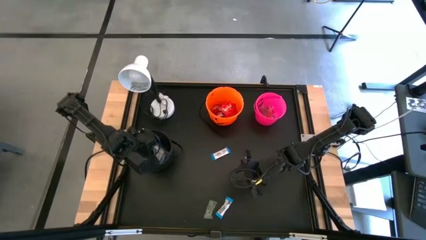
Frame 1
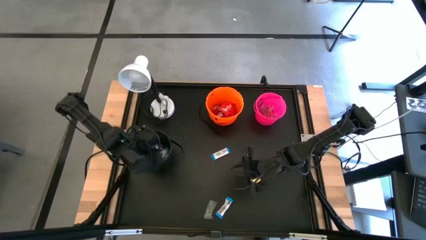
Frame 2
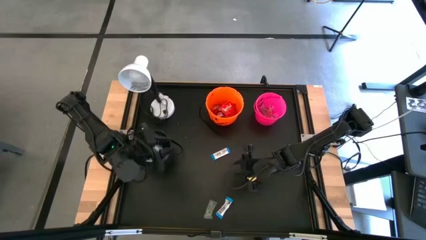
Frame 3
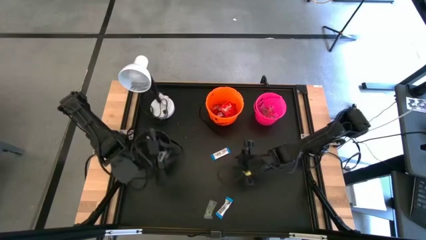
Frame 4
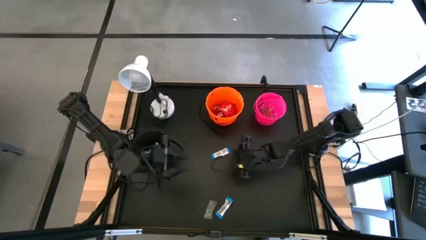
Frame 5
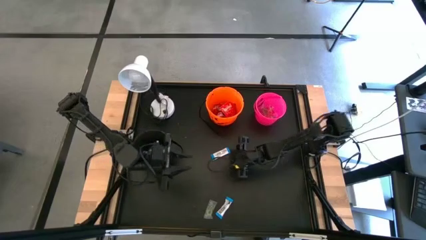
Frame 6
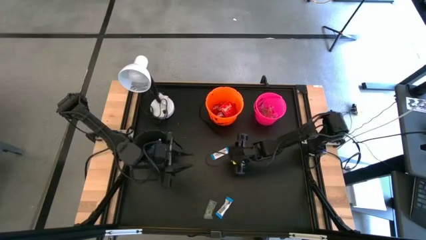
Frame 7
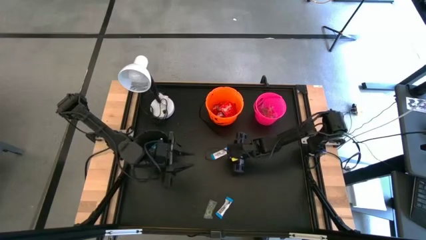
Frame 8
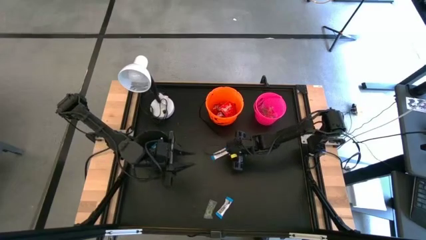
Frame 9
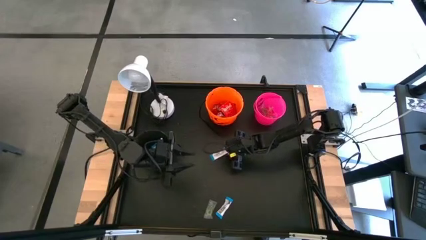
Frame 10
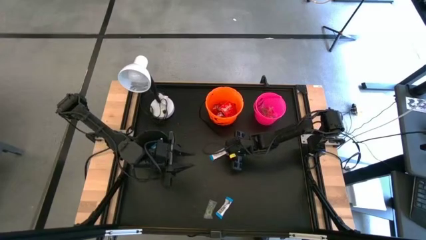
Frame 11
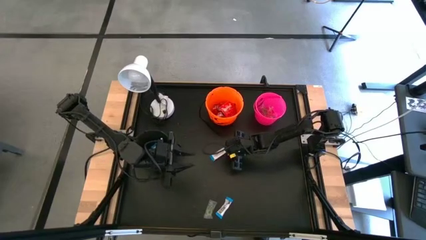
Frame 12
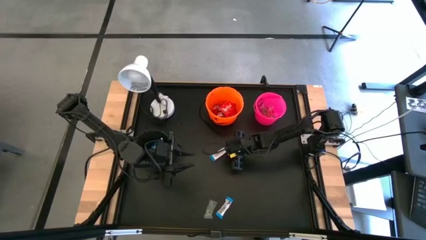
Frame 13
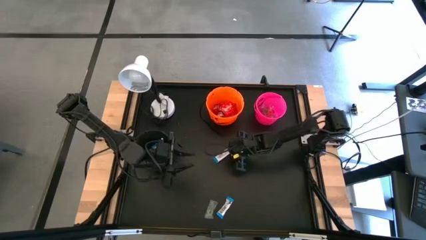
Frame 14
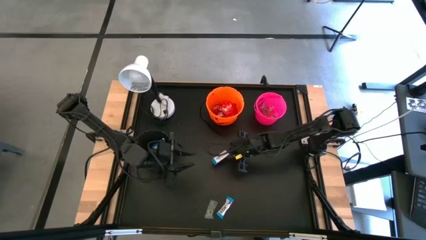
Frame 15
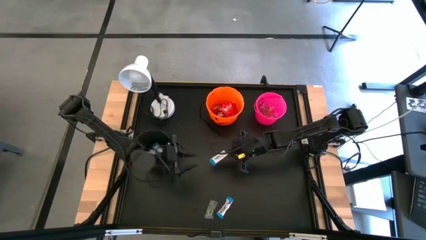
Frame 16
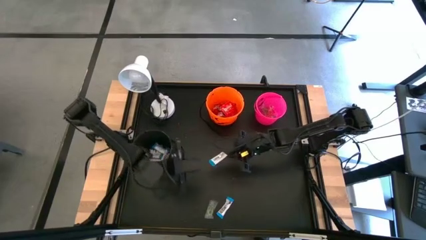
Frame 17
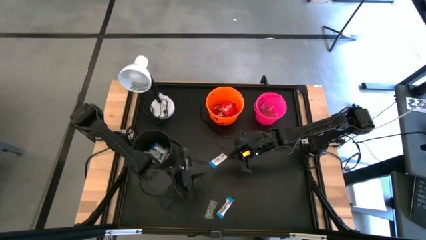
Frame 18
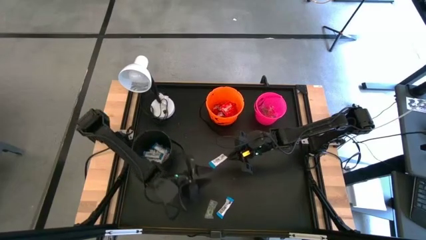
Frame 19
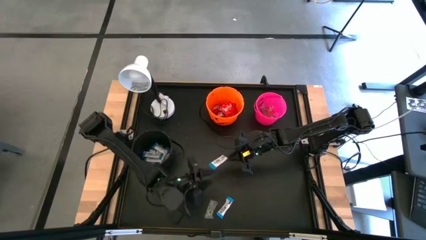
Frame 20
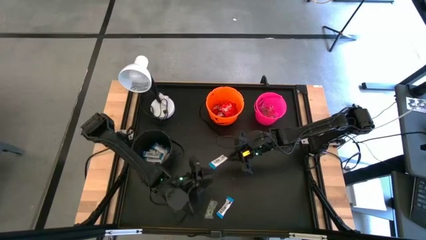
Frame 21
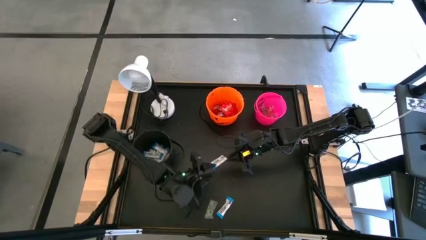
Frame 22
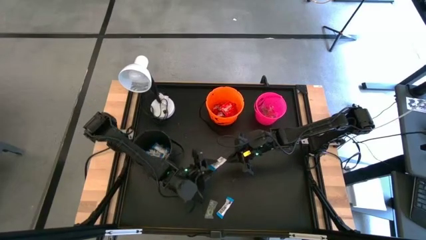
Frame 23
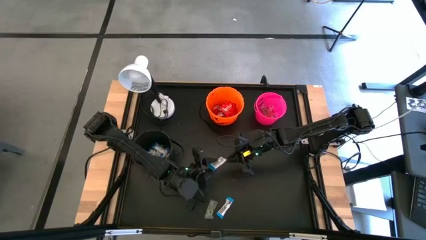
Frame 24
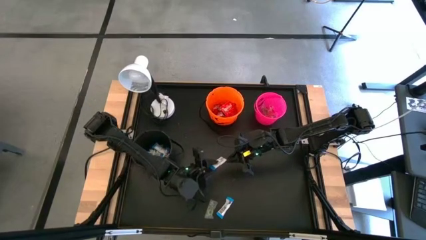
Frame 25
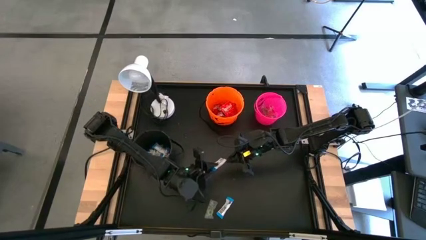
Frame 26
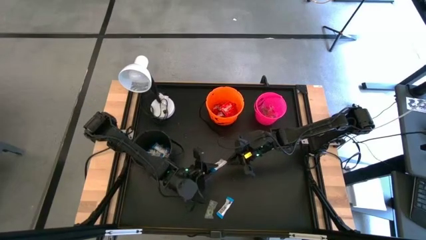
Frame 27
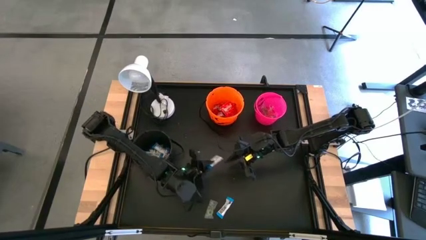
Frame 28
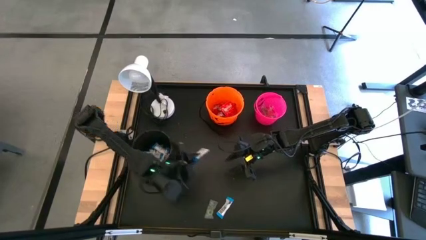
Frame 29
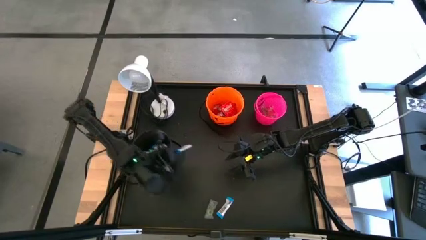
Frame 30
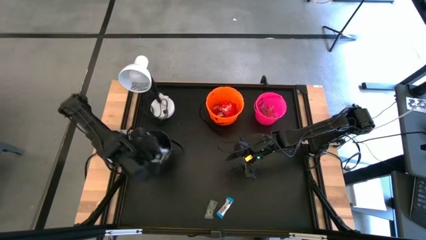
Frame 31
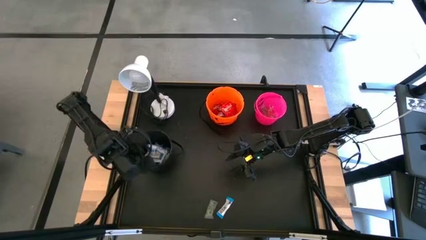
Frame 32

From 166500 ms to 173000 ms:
Task: Sort candy
Put the white candy into the black bucket

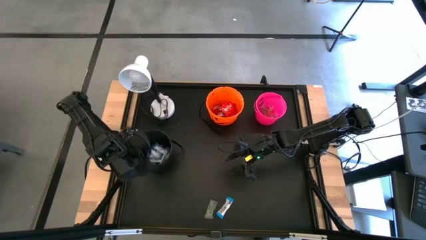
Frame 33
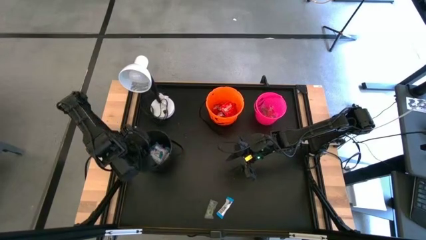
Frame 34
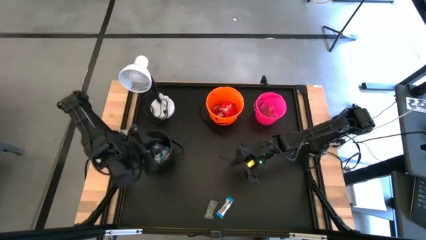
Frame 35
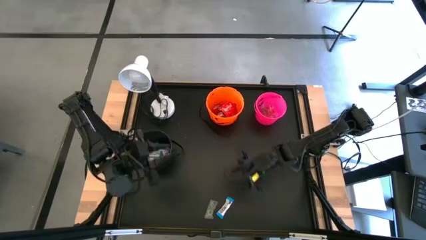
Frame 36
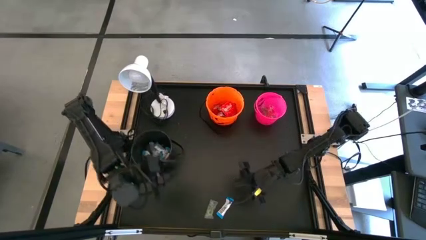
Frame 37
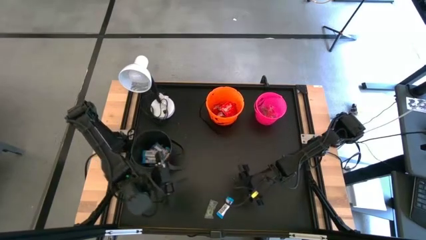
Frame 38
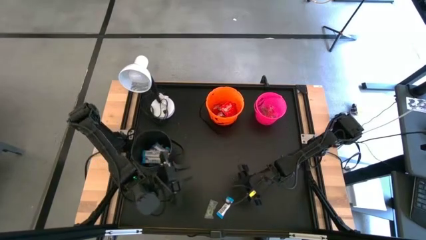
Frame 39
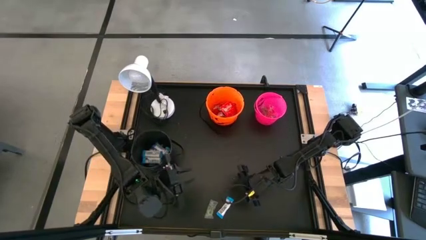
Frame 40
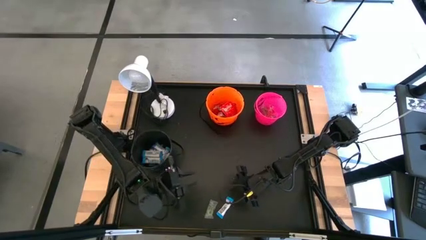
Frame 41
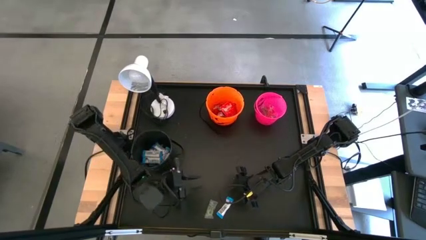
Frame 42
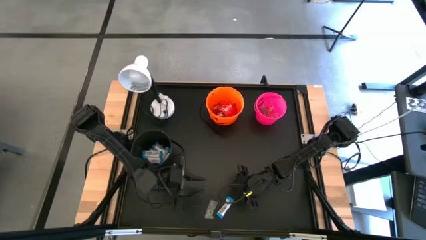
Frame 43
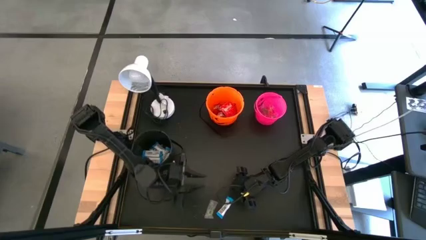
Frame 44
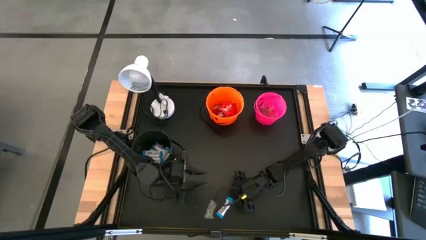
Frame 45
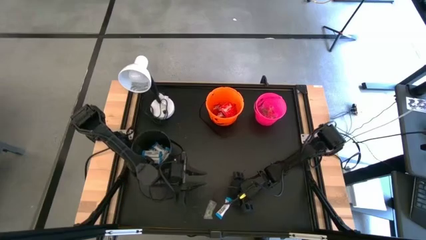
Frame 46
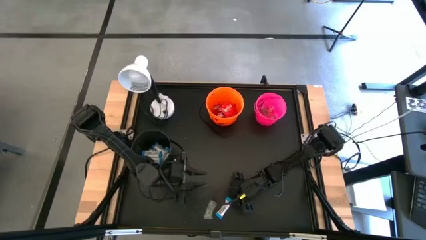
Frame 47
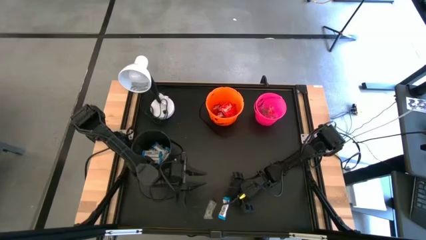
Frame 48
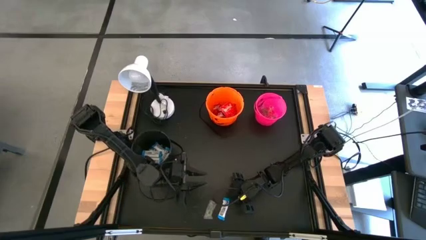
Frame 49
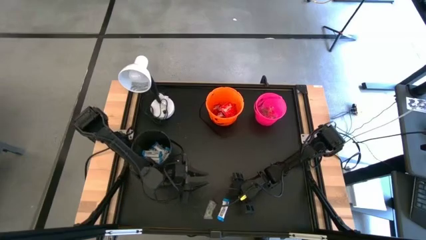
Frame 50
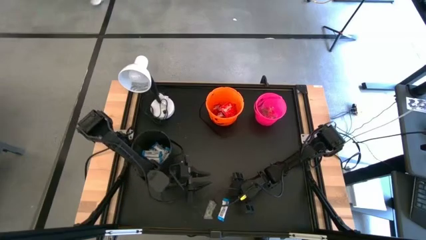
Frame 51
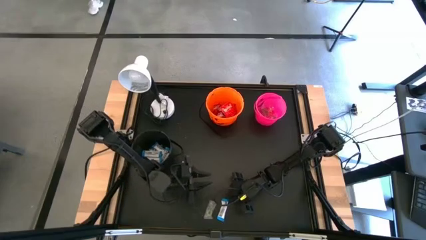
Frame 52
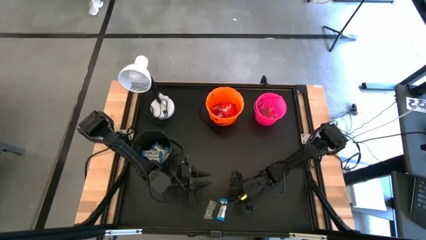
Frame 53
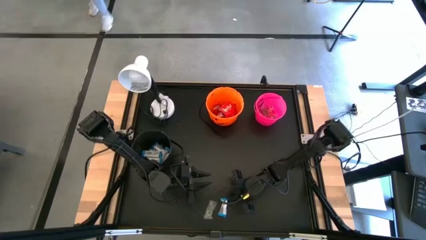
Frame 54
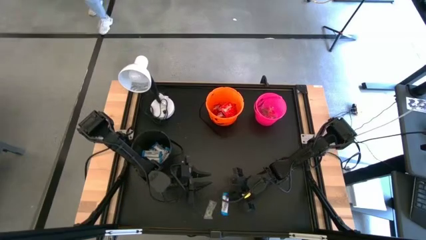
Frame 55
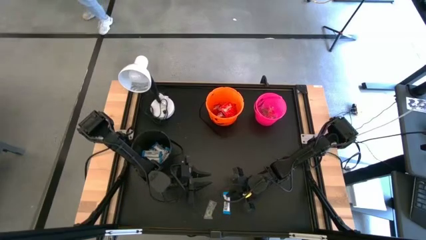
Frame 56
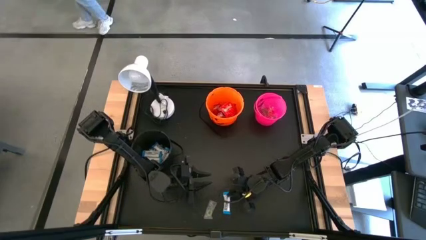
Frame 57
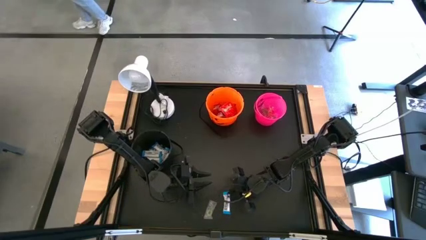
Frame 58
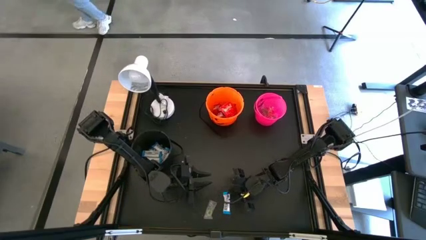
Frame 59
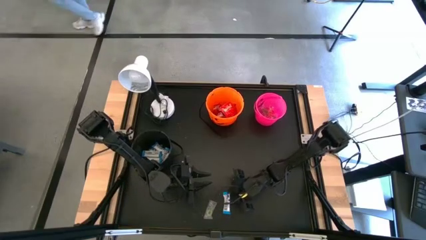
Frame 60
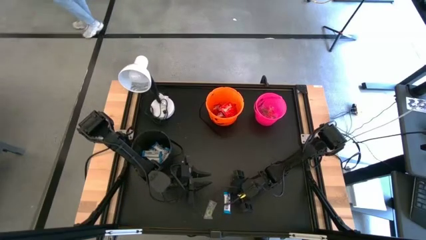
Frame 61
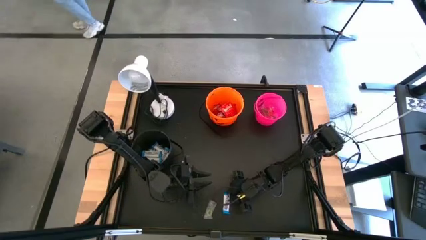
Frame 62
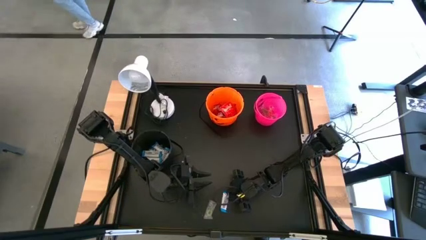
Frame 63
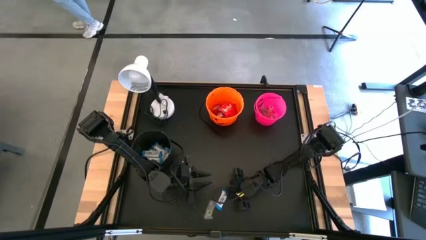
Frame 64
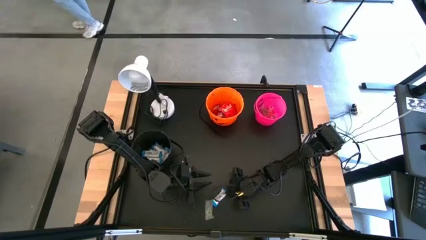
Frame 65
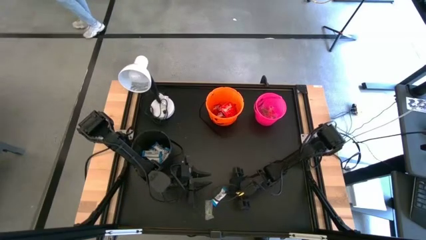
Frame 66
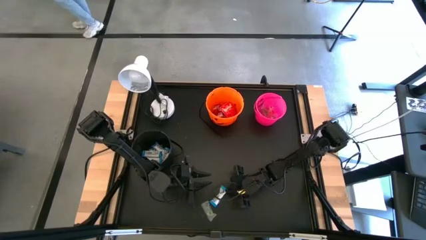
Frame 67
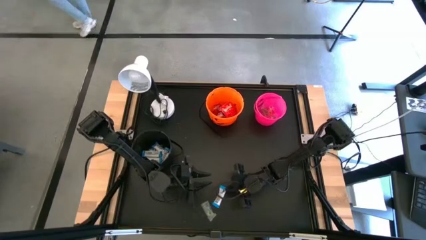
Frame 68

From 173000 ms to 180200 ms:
Put the white candy into the black bucket

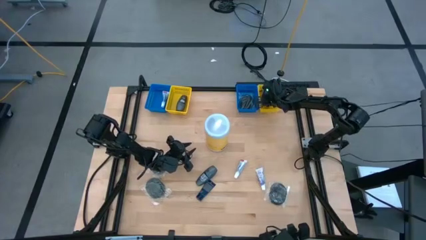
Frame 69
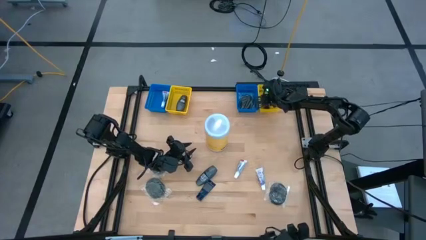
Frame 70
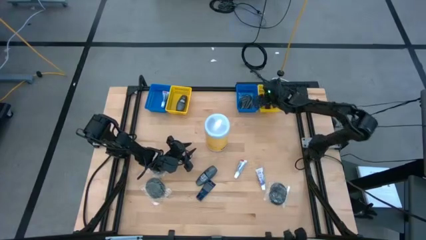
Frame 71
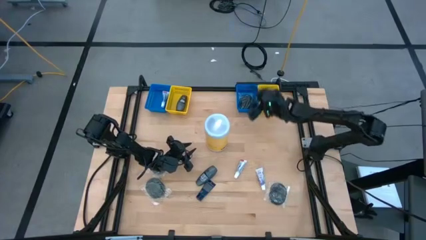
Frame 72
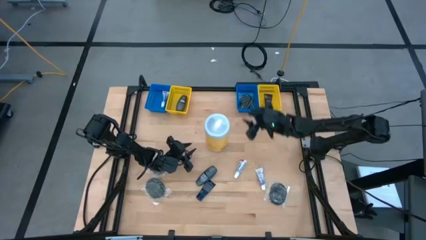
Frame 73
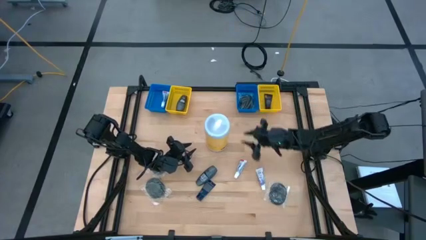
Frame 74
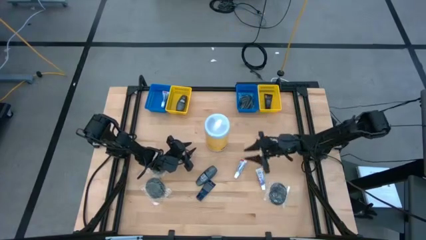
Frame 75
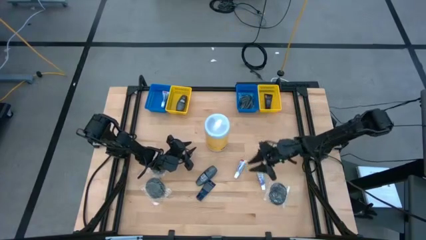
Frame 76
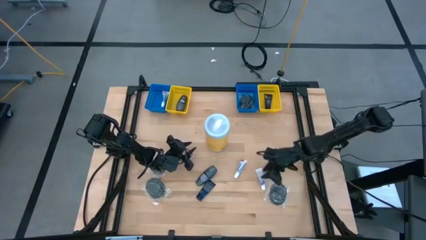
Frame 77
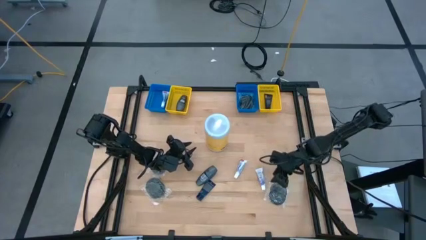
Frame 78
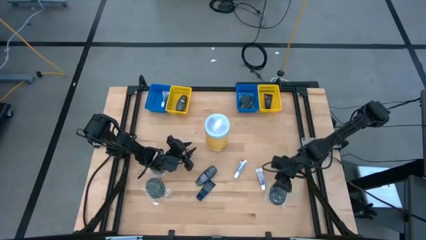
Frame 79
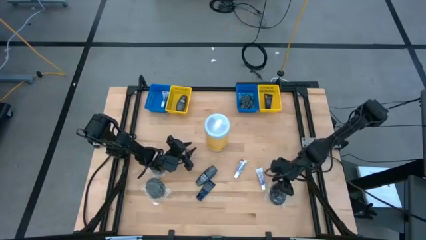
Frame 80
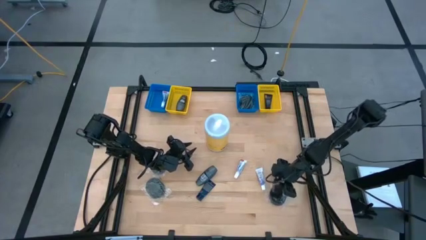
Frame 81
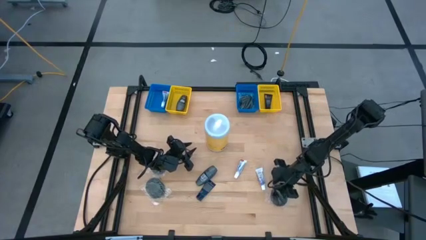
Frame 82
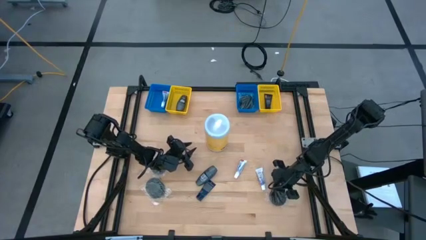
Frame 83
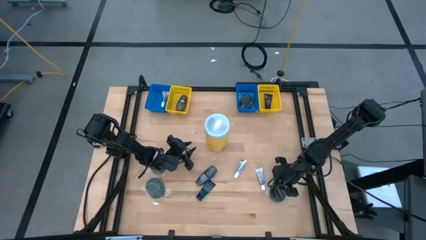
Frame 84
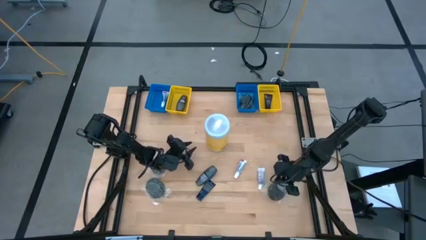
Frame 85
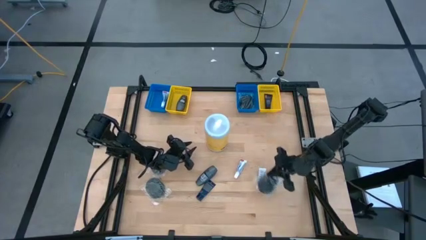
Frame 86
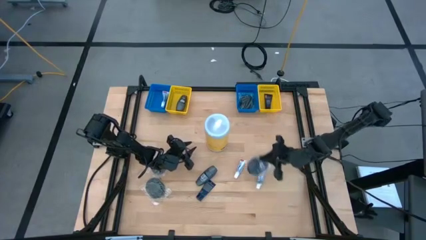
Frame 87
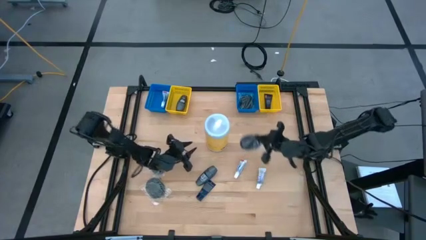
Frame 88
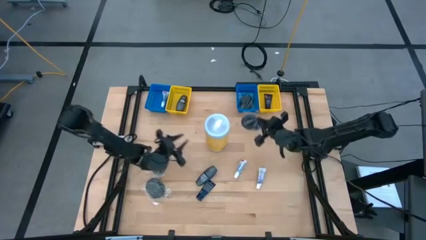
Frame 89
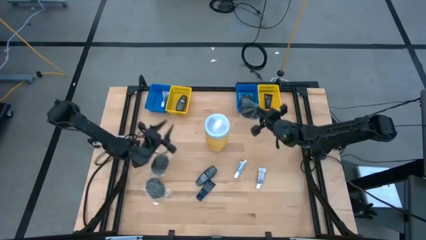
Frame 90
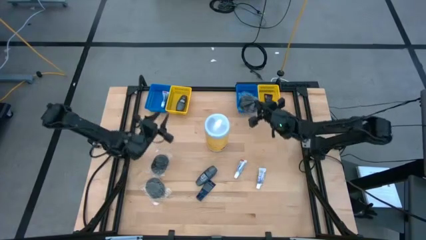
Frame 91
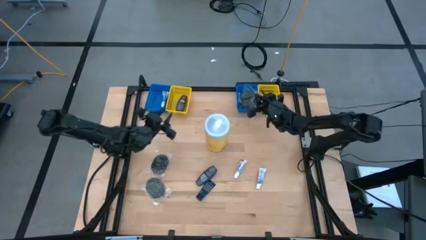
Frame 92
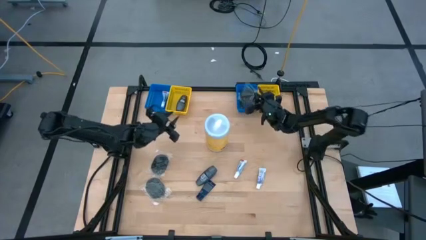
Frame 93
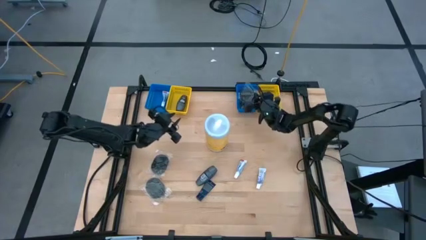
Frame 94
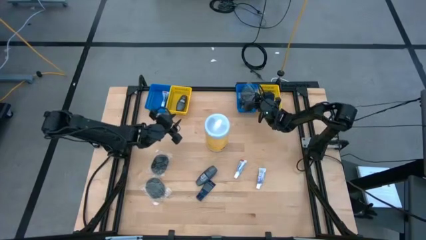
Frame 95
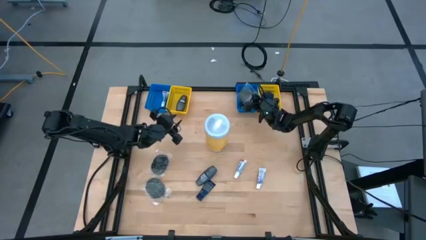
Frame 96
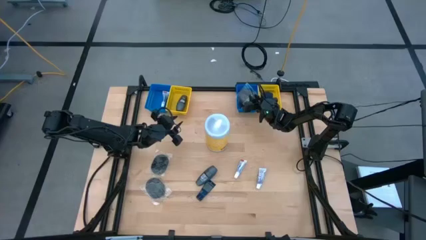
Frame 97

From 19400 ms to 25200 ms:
Task: Pick & Place Travel size toiletries
Put the bottom right hairbrush into the right blue bin
